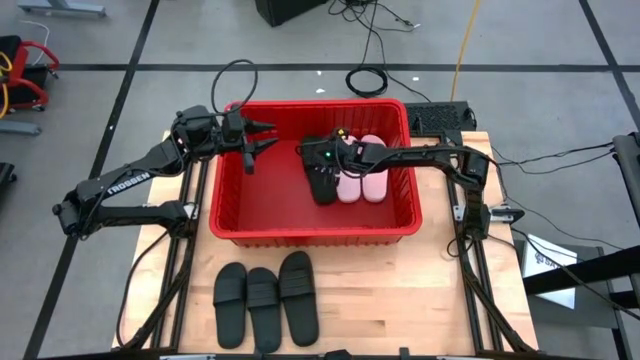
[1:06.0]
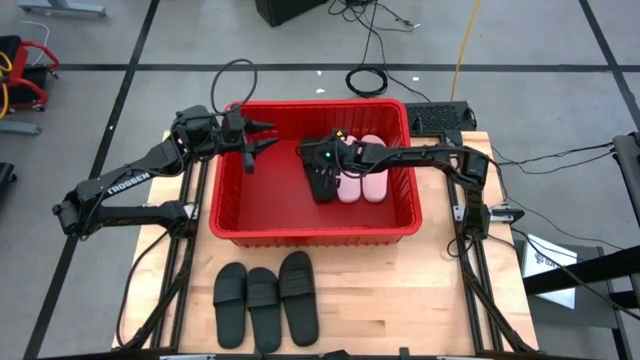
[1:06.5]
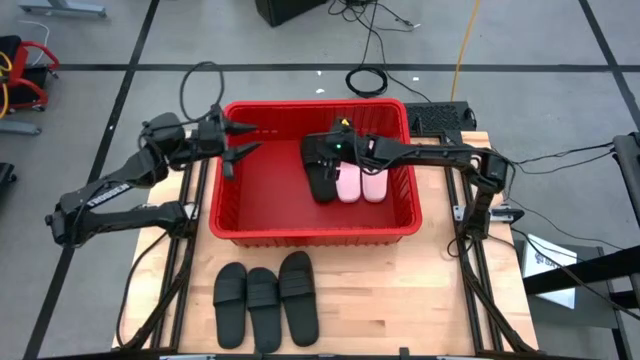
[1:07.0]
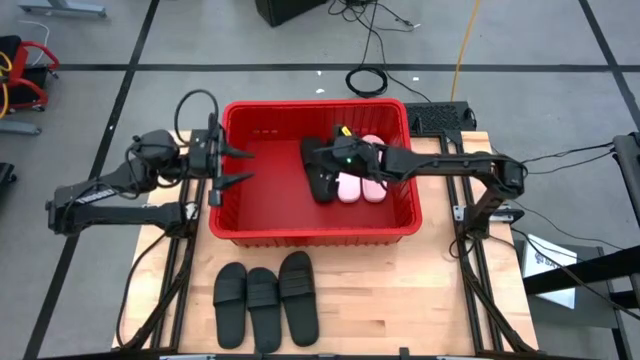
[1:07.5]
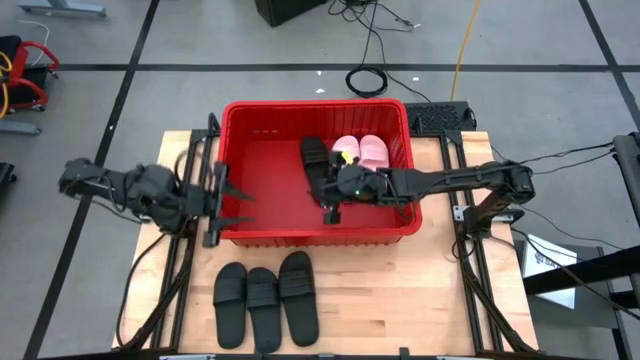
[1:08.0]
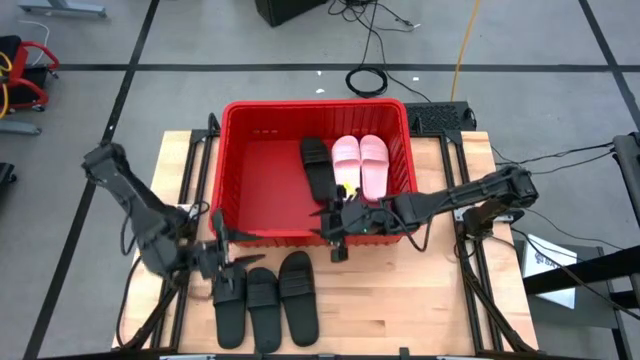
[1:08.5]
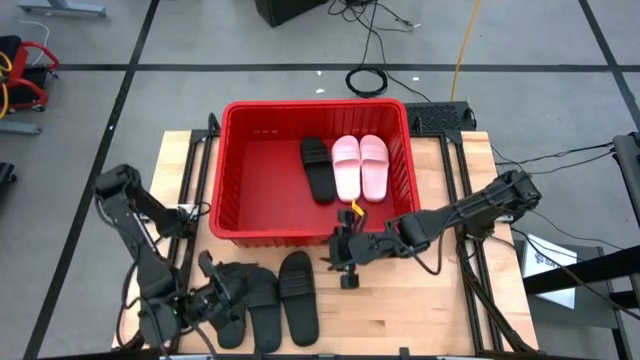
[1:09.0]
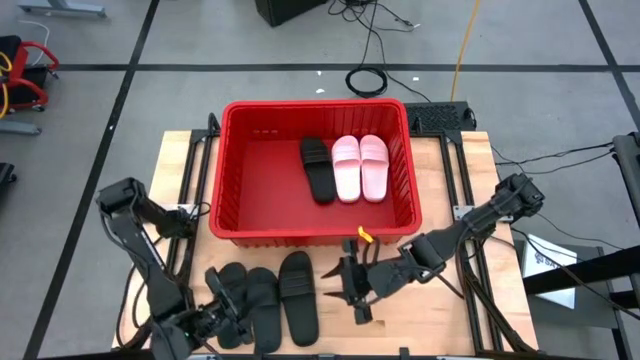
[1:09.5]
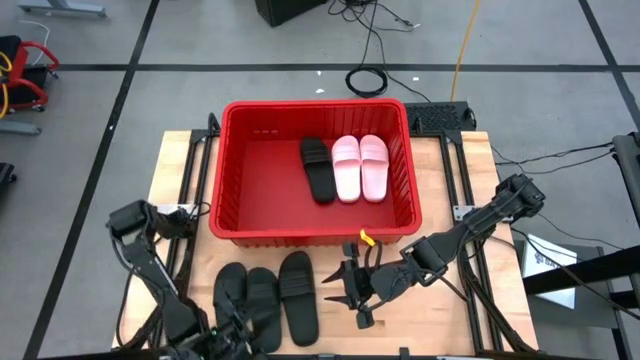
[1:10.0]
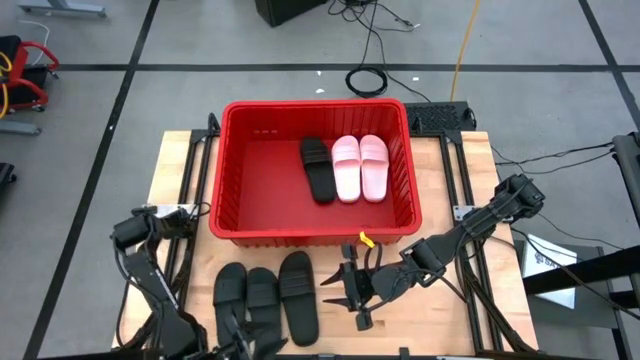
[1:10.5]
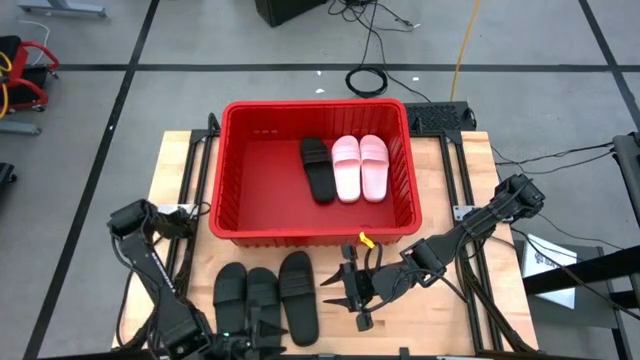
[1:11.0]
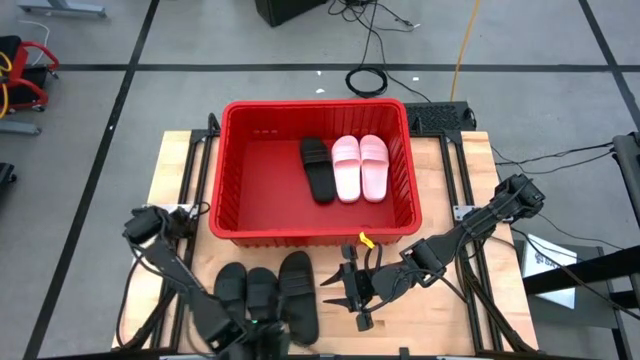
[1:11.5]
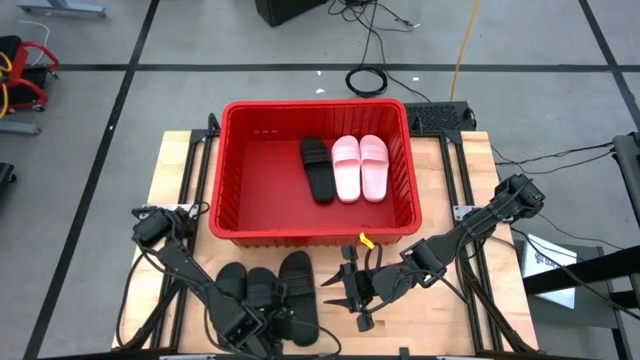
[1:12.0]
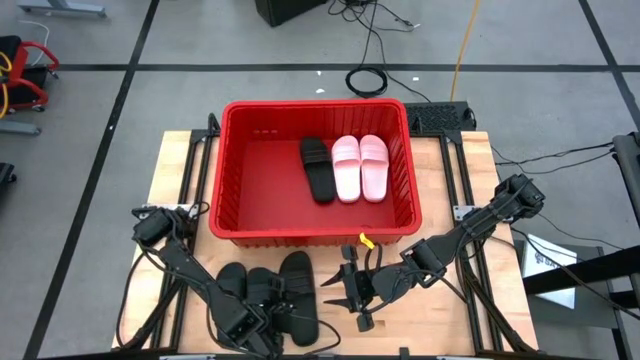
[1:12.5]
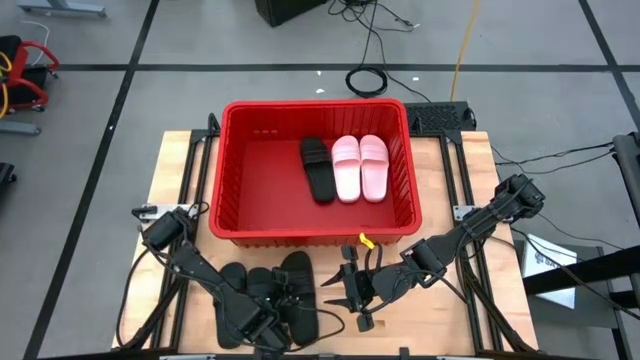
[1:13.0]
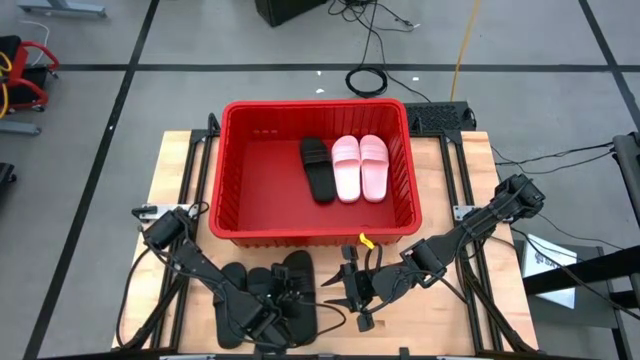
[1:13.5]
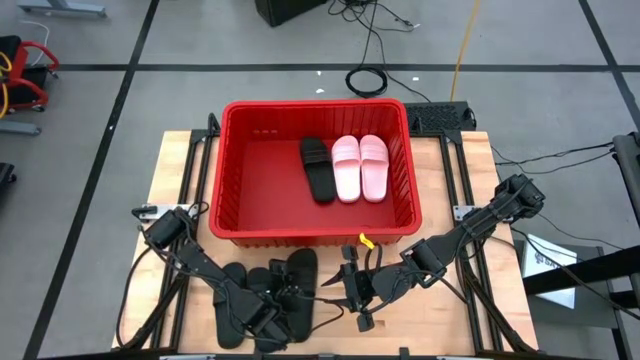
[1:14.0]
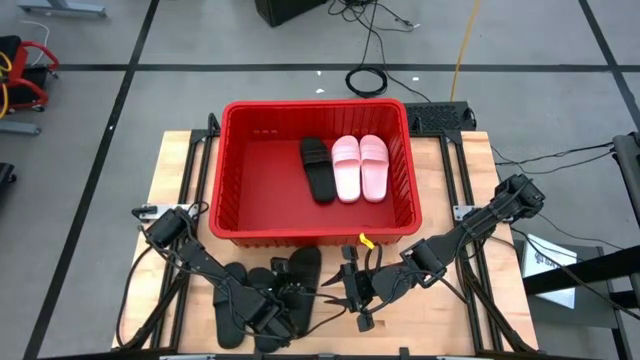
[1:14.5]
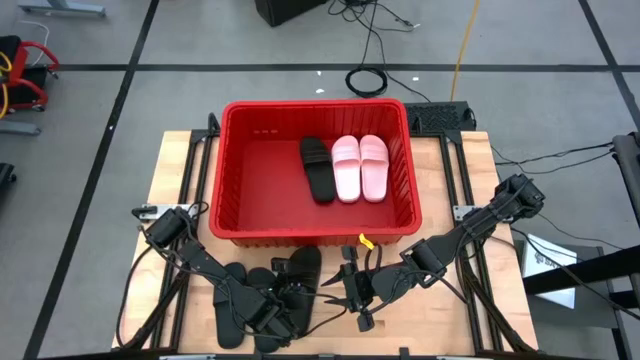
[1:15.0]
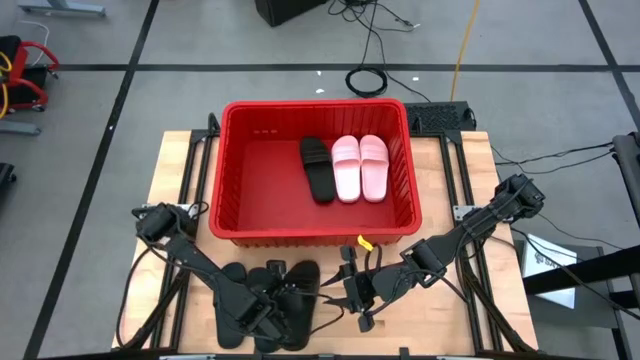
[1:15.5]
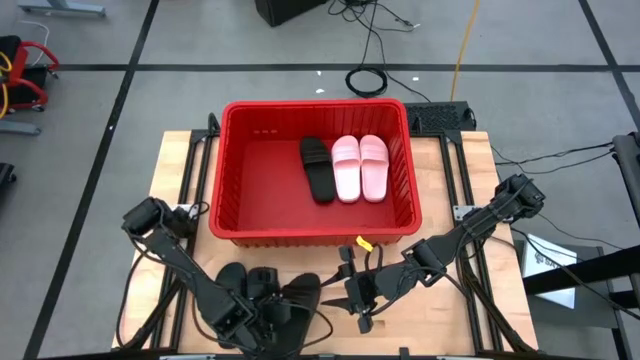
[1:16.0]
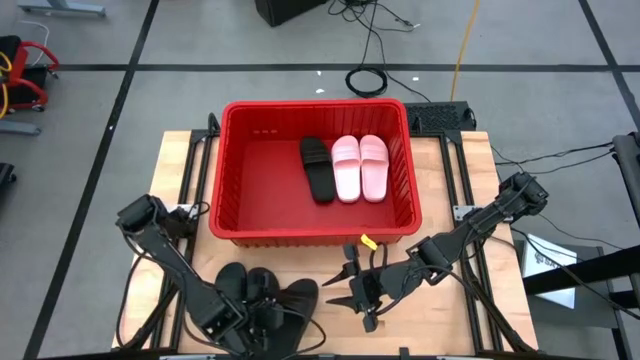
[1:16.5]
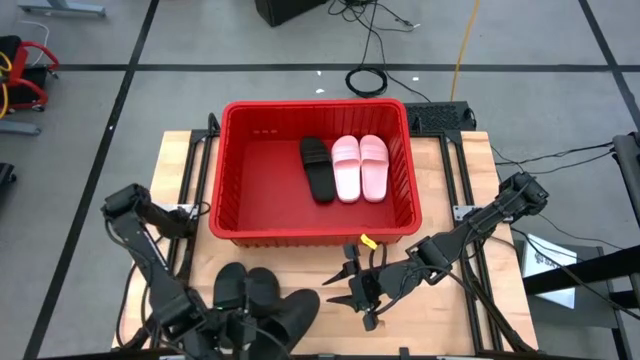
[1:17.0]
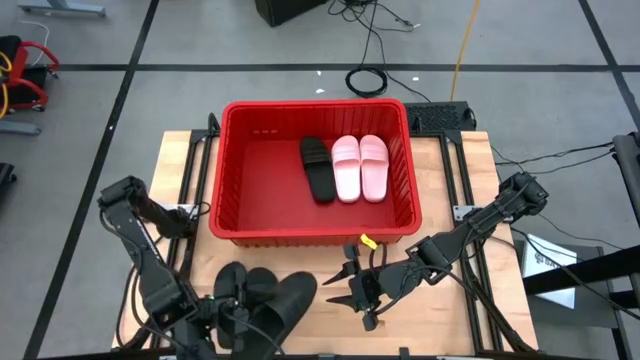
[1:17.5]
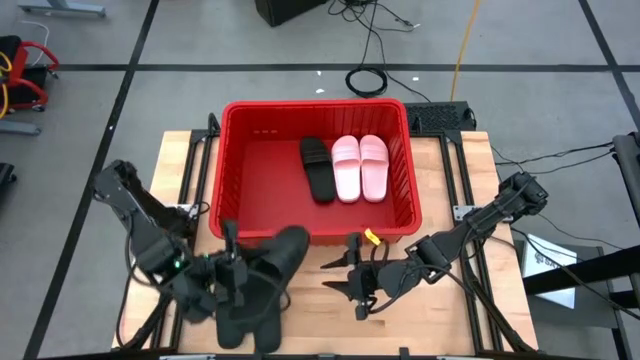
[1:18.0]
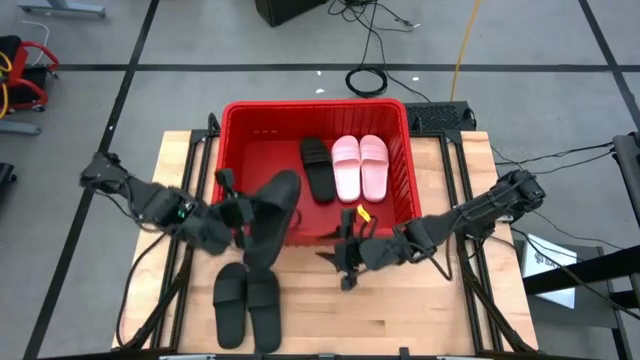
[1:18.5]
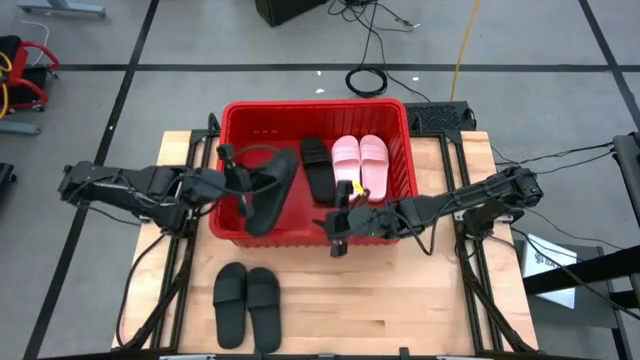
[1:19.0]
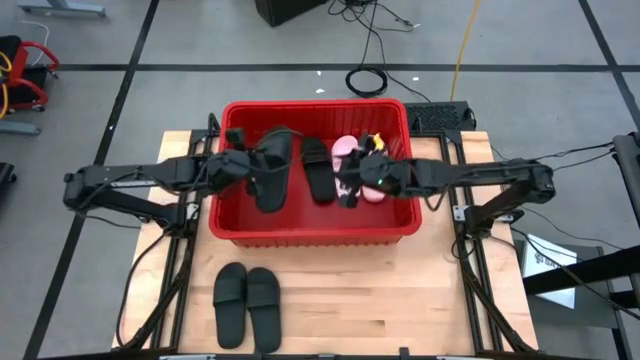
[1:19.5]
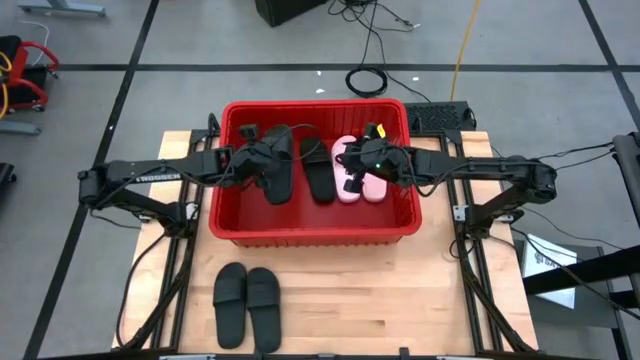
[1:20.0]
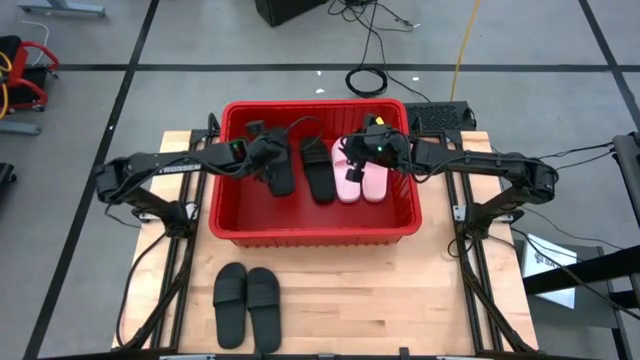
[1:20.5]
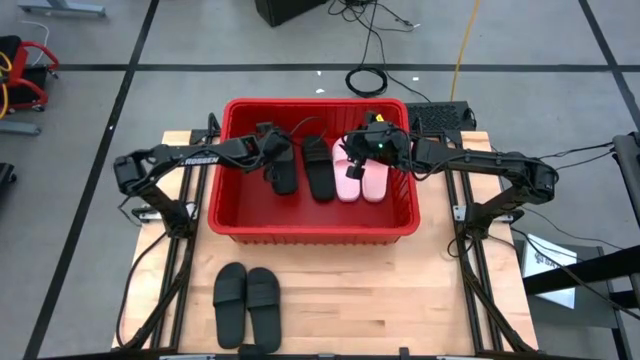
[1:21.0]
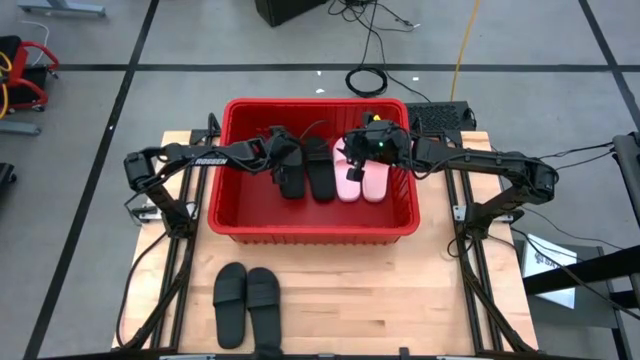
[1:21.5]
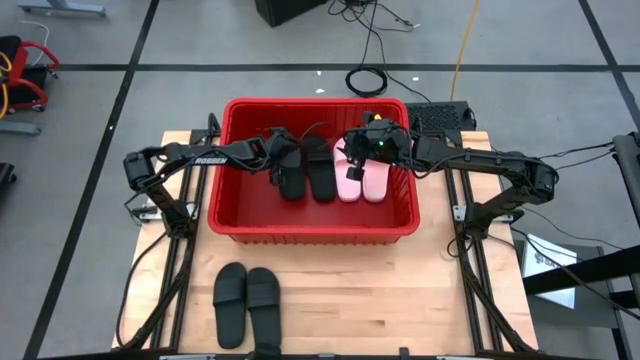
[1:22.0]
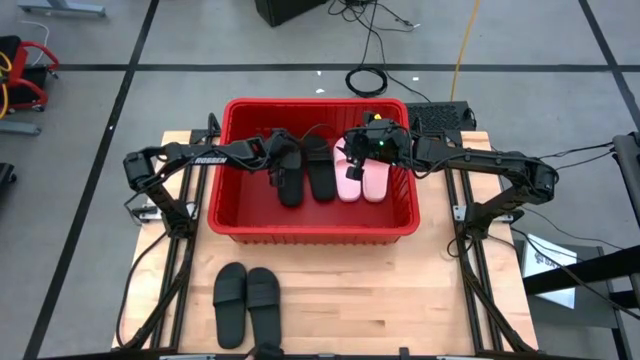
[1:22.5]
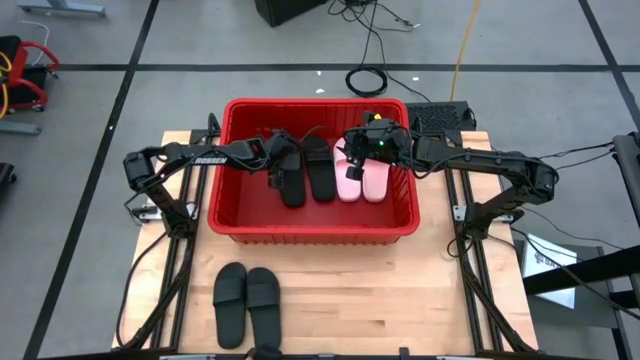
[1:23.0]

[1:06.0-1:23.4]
Task: Pick and place slides into bin
Put the black slipper into the red bin
